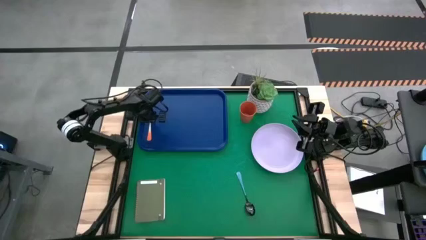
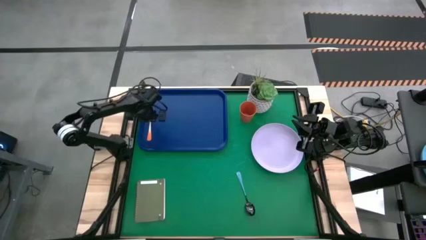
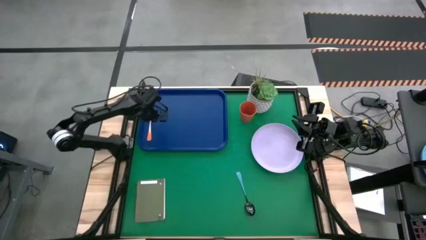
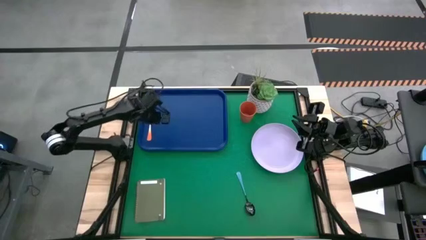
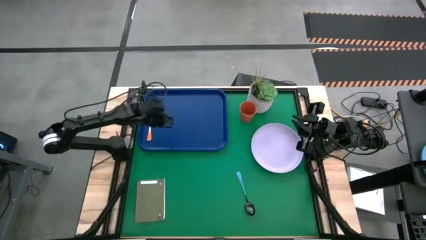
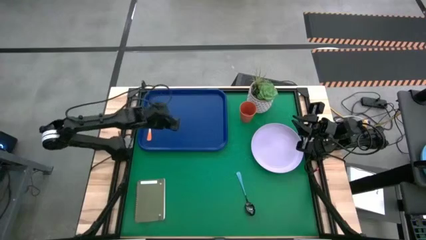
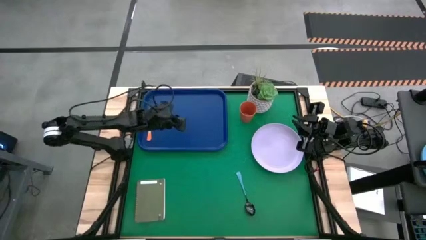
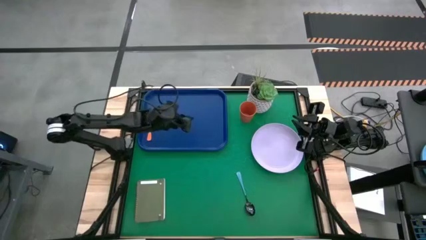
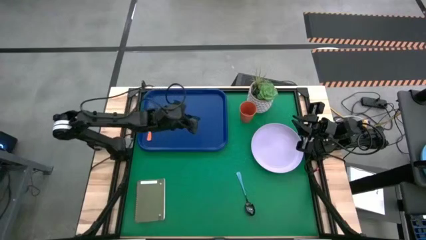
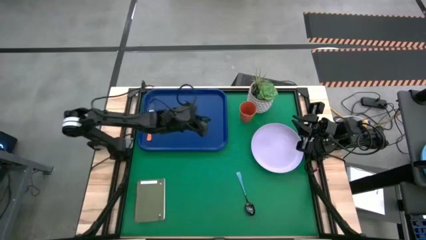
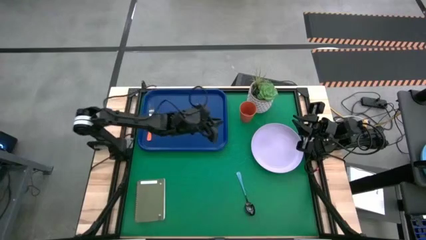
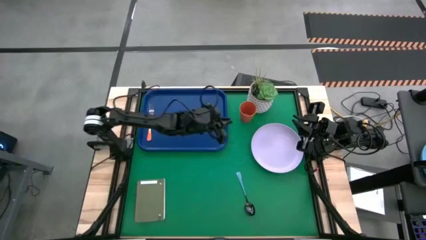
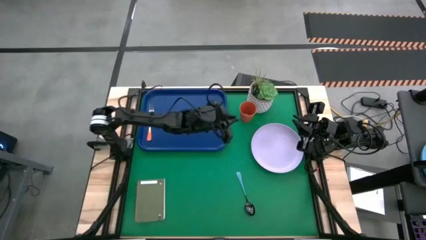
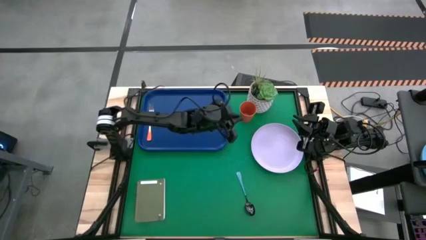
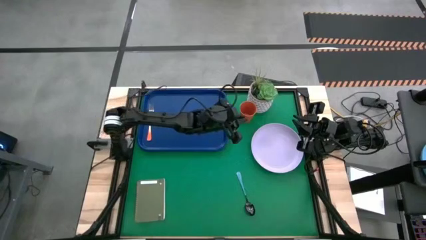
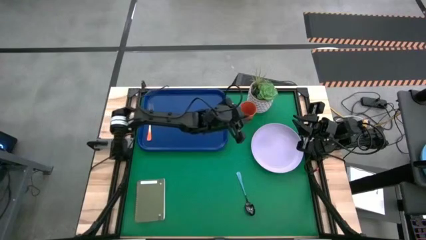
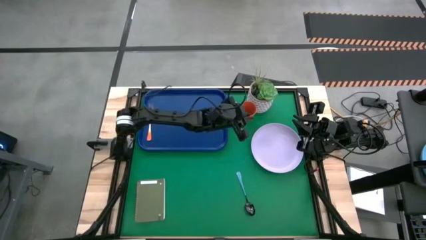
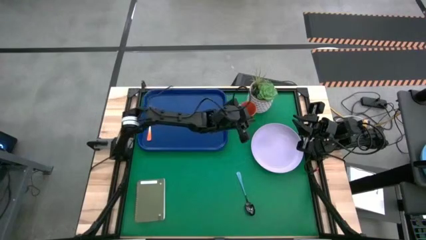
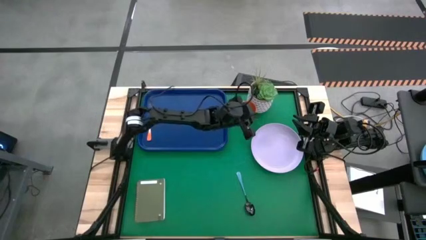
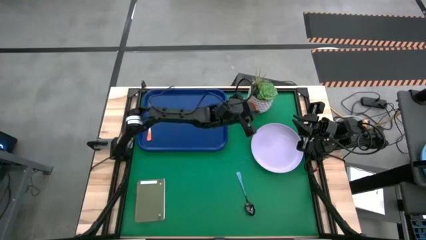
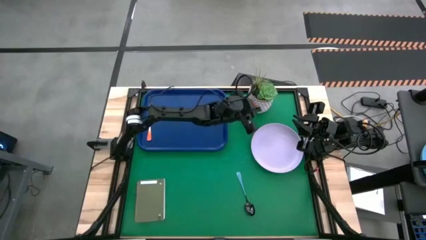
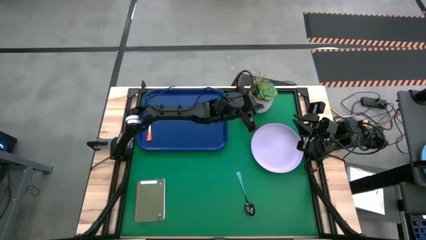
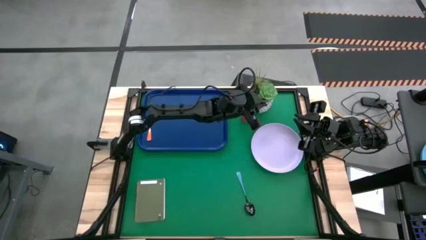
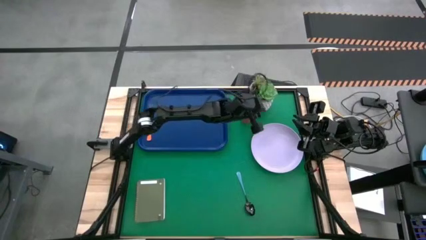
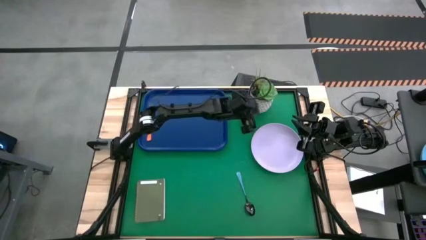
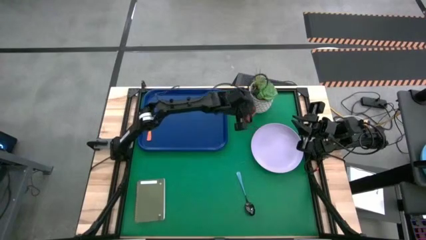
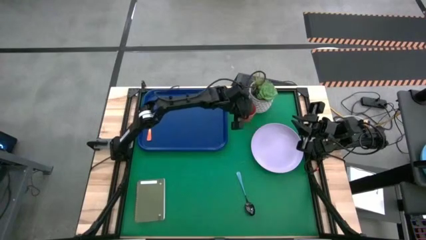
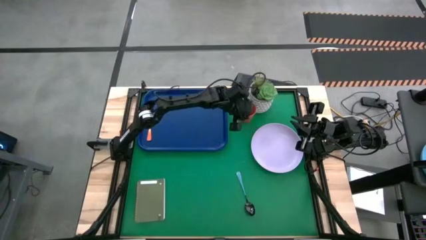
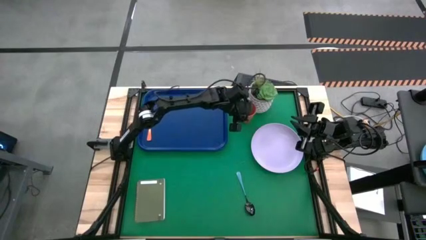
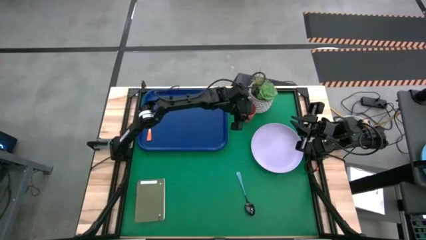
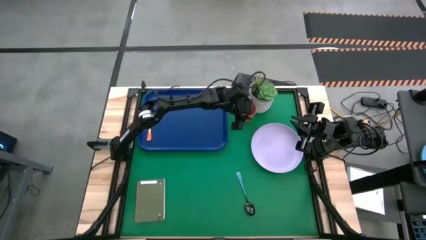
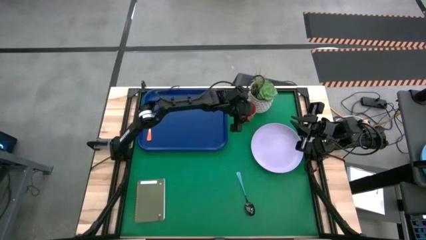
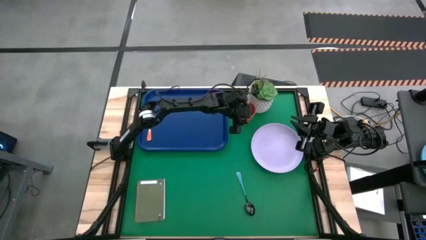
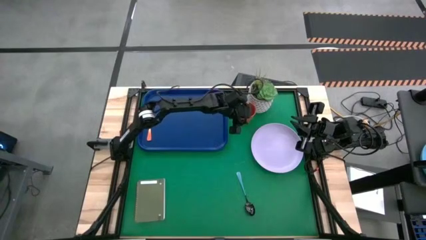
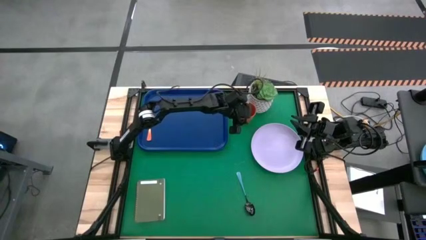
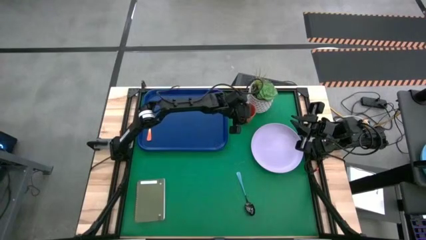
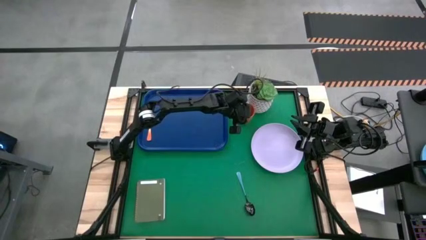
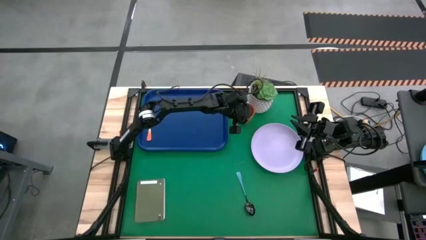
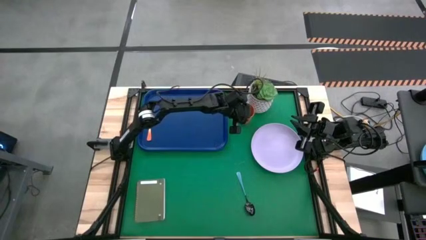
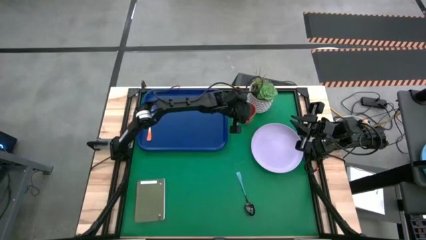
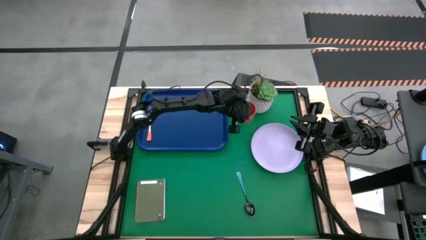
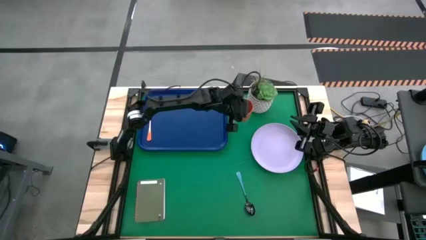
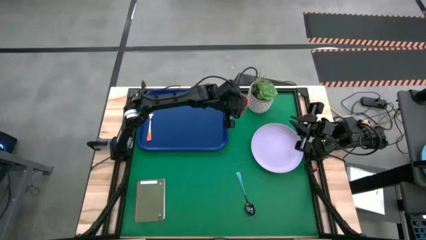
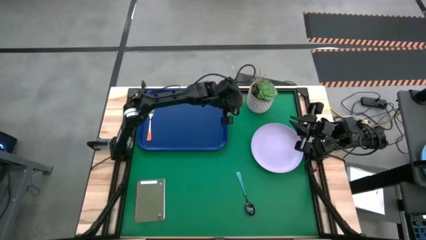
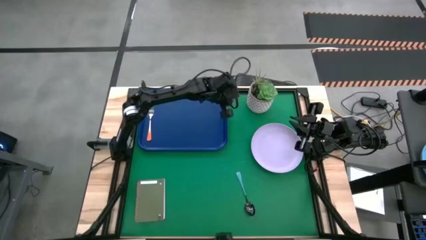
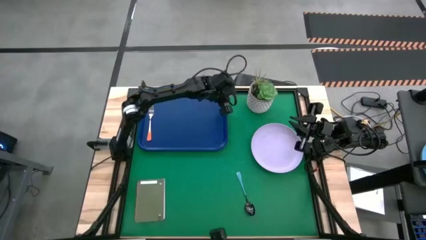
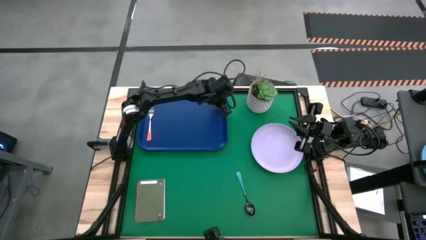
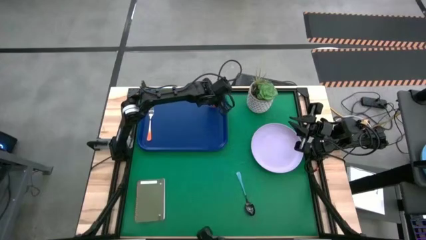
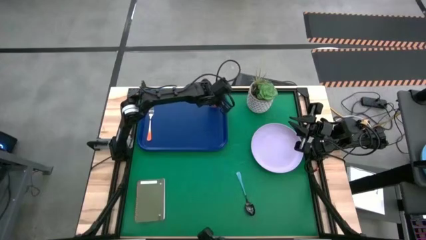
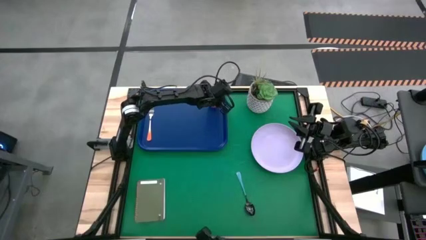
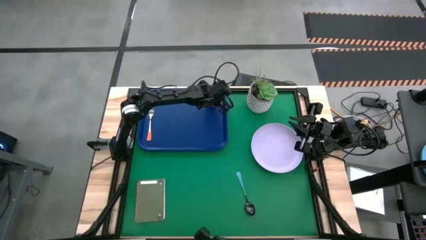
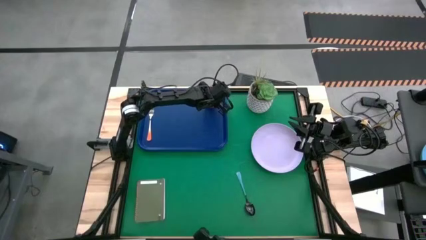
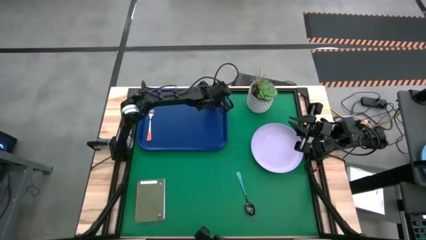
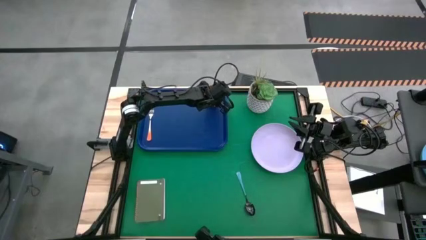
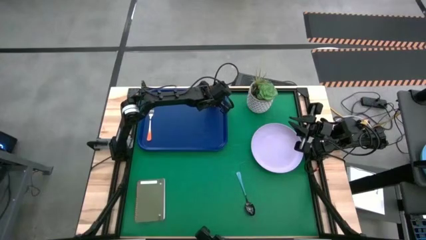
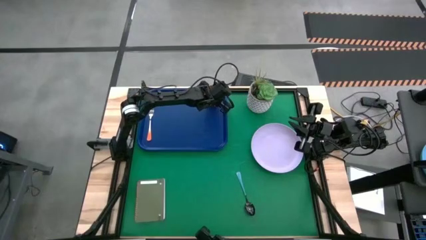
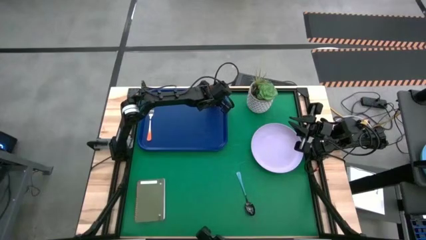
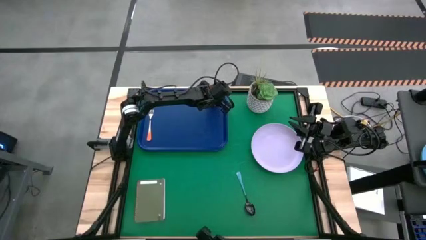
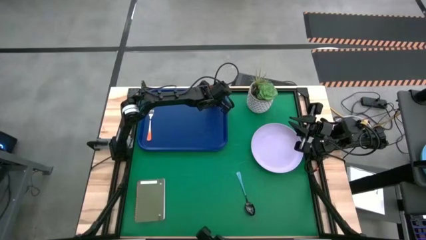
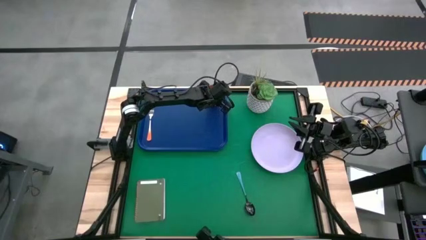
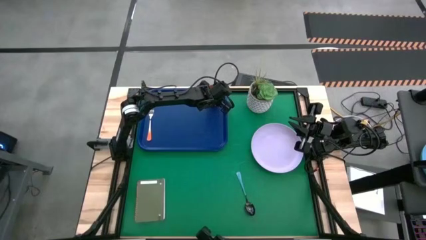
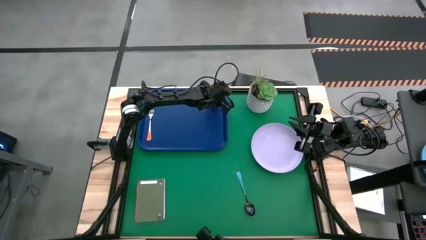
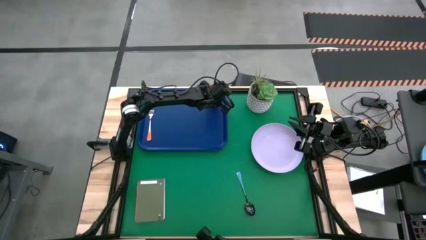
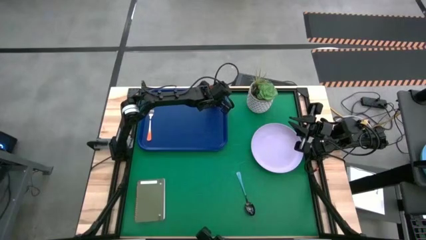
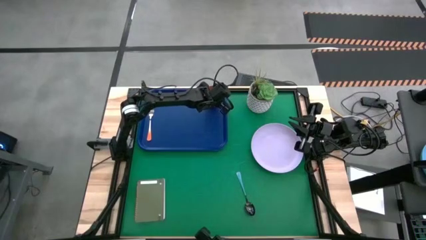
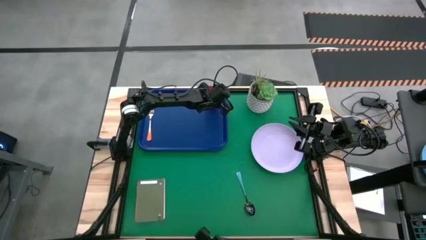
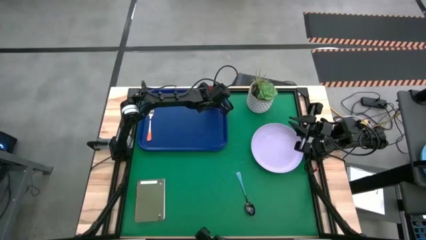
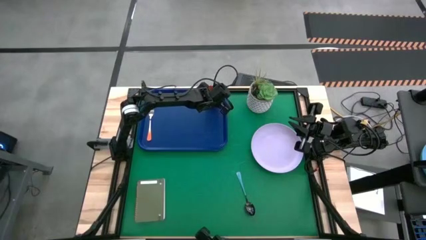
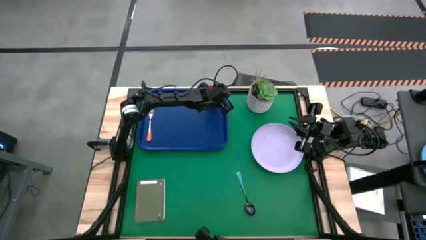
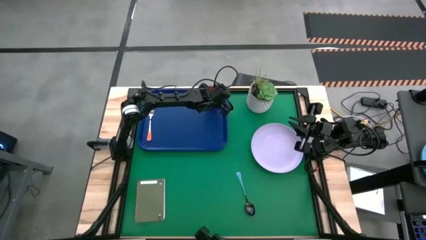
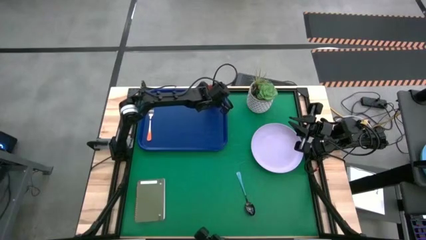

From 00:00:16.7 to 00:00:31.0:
Task: Pick and place plate/cup/fork/spoon on tray
Put the orange cup on the top right of the blue tray
